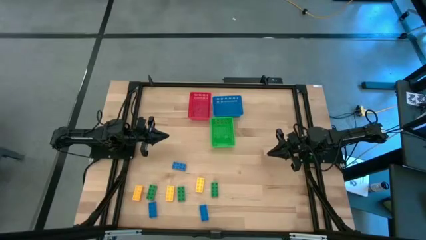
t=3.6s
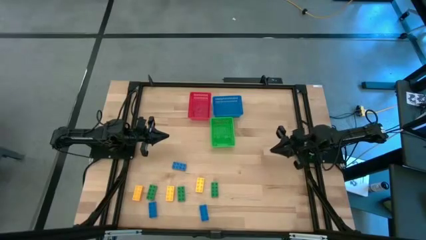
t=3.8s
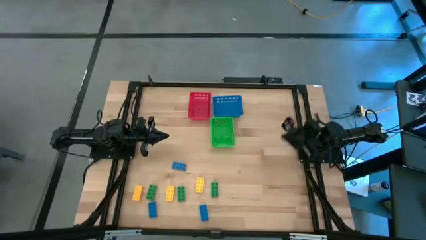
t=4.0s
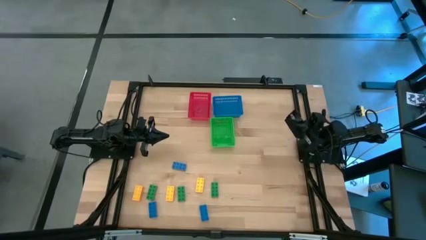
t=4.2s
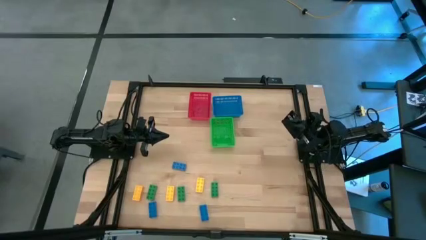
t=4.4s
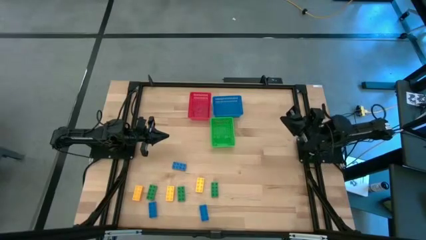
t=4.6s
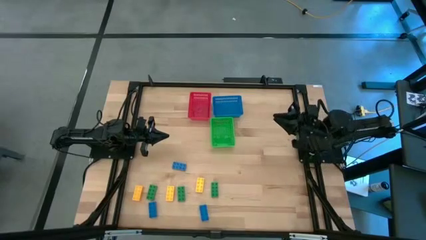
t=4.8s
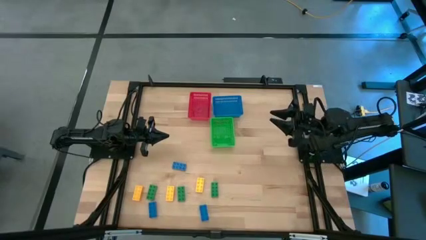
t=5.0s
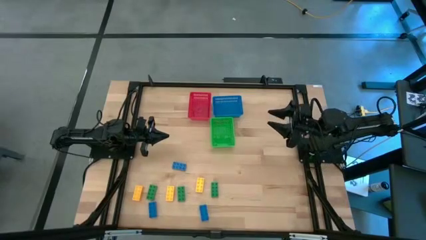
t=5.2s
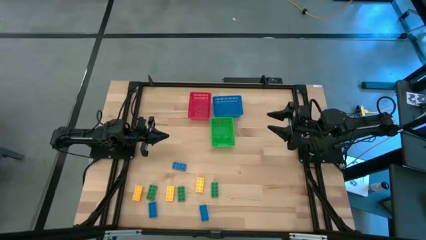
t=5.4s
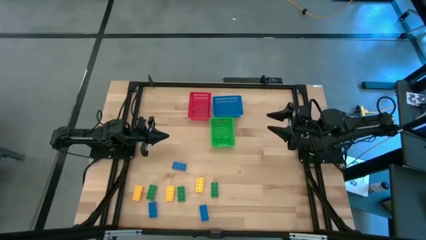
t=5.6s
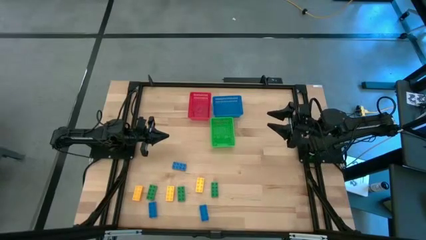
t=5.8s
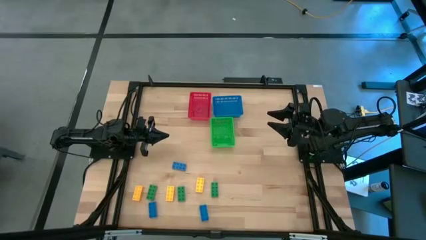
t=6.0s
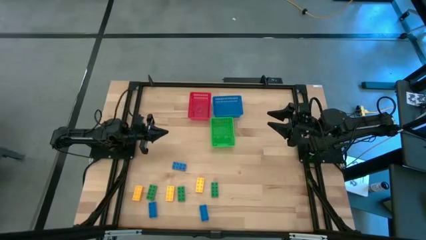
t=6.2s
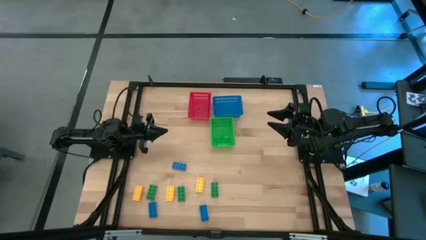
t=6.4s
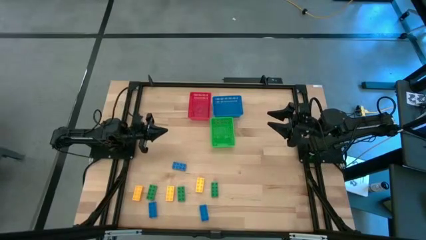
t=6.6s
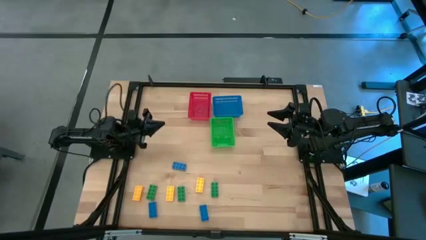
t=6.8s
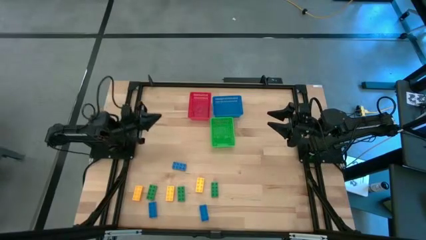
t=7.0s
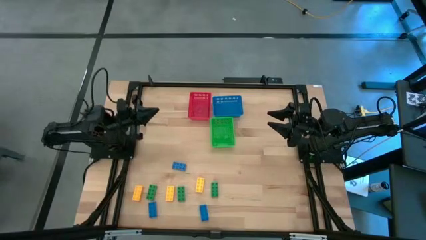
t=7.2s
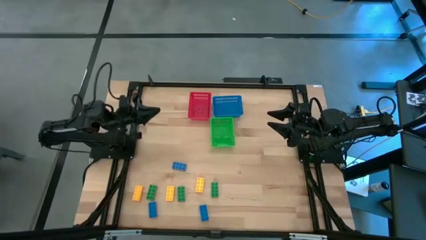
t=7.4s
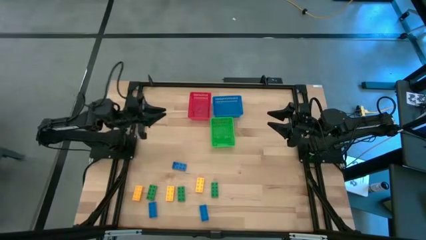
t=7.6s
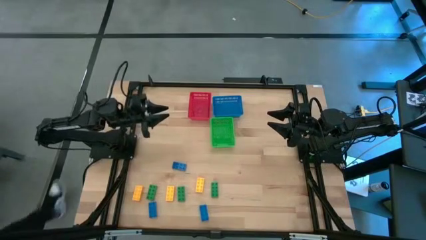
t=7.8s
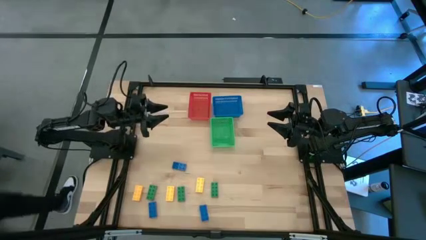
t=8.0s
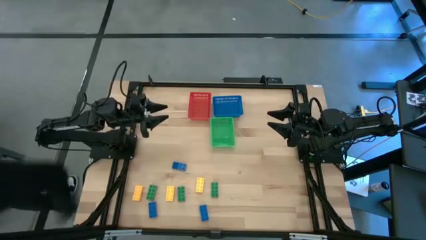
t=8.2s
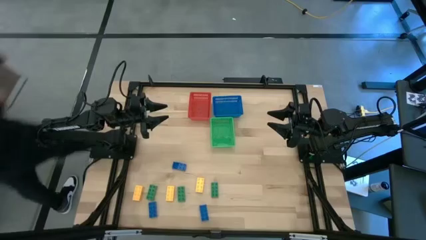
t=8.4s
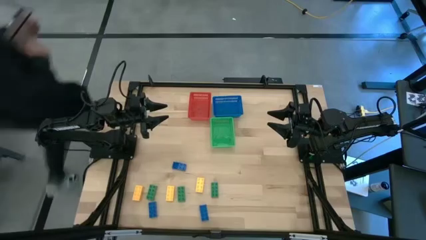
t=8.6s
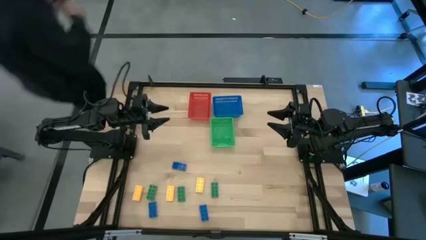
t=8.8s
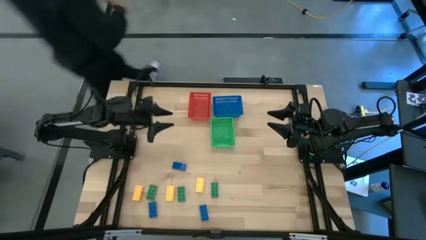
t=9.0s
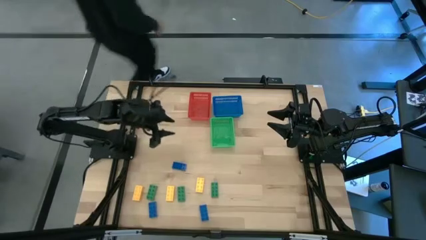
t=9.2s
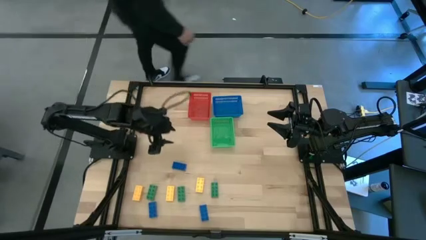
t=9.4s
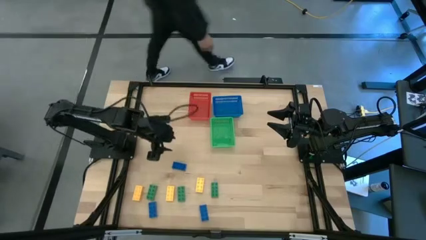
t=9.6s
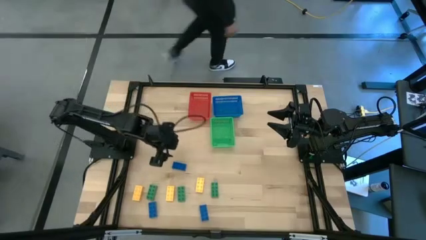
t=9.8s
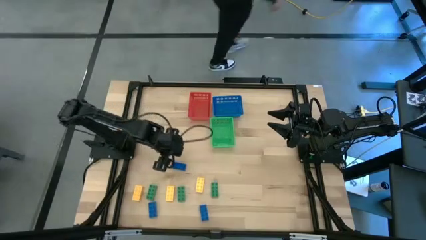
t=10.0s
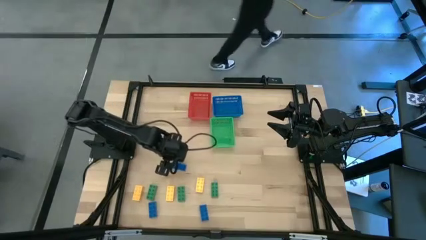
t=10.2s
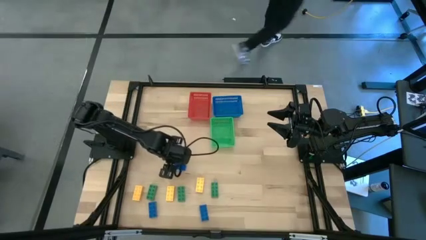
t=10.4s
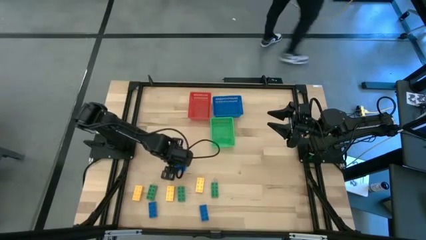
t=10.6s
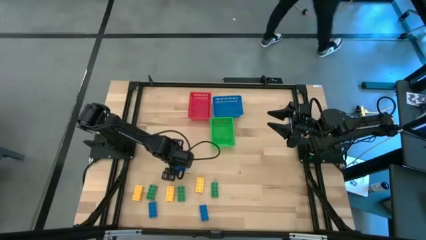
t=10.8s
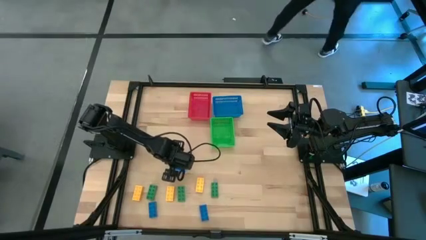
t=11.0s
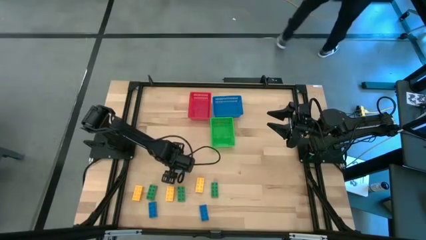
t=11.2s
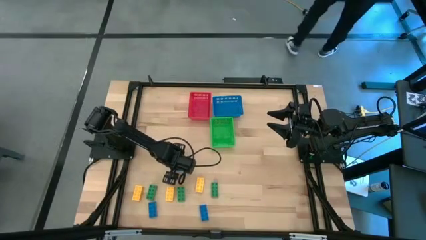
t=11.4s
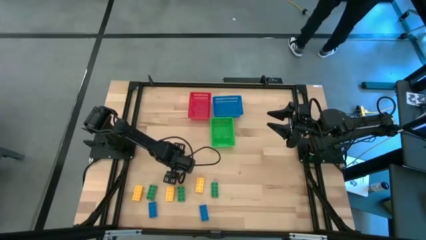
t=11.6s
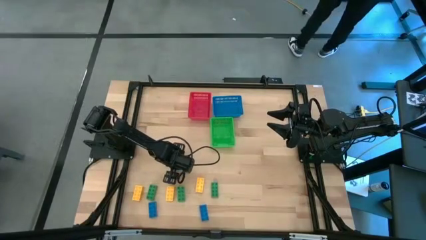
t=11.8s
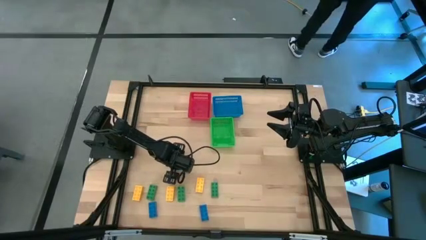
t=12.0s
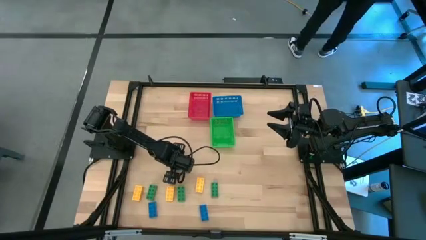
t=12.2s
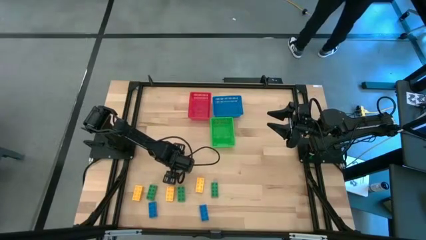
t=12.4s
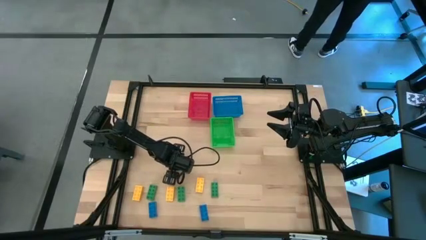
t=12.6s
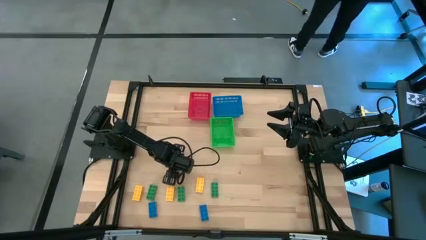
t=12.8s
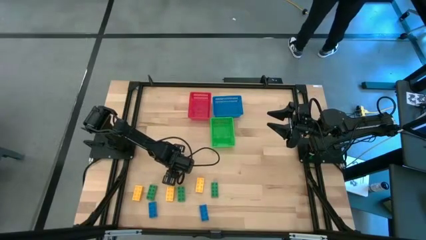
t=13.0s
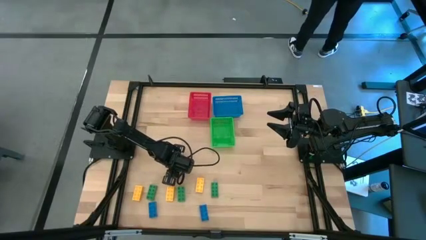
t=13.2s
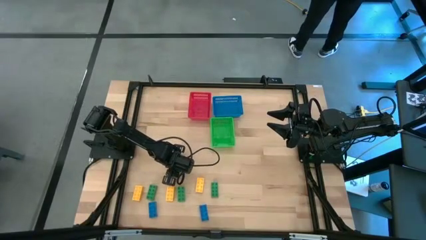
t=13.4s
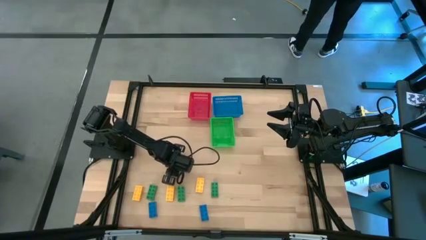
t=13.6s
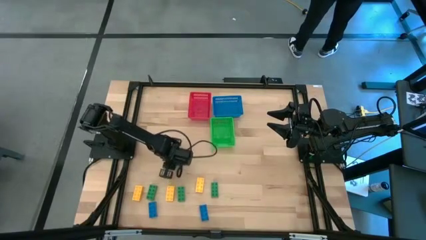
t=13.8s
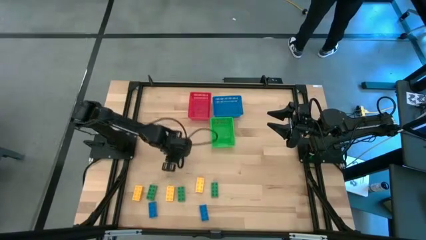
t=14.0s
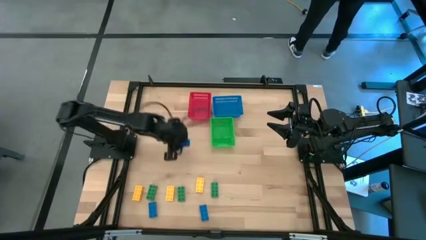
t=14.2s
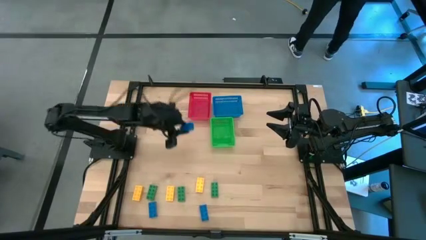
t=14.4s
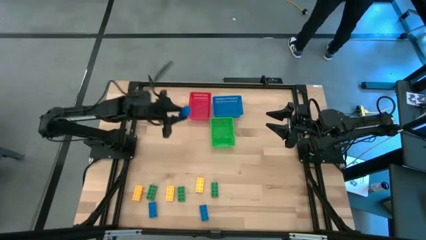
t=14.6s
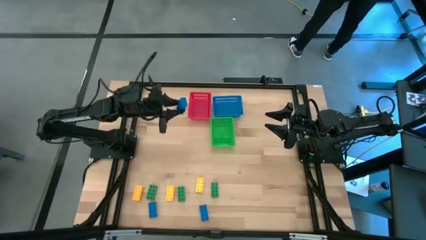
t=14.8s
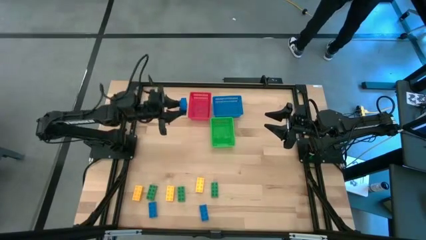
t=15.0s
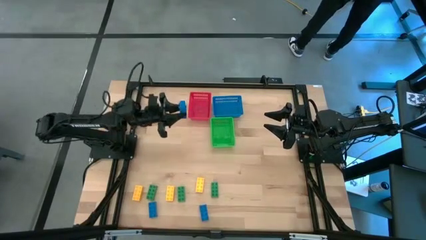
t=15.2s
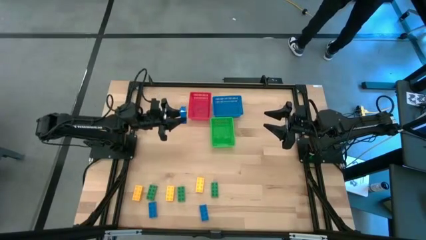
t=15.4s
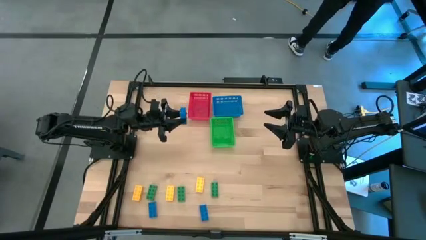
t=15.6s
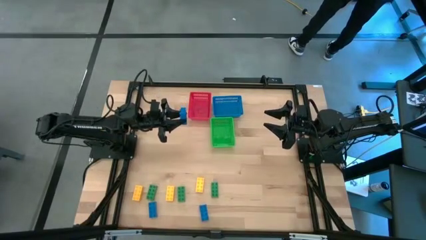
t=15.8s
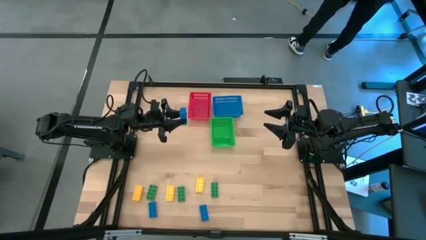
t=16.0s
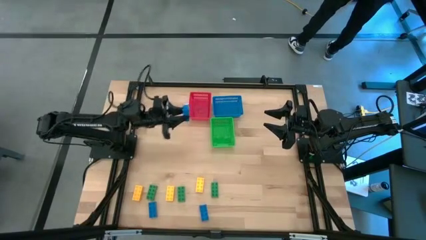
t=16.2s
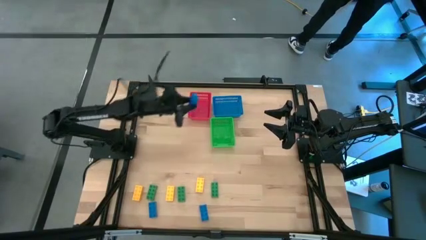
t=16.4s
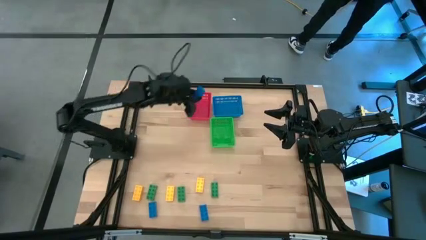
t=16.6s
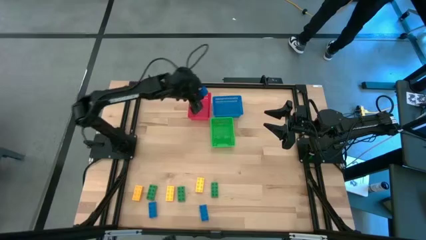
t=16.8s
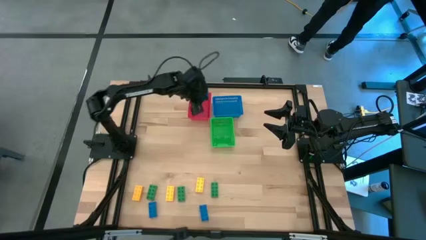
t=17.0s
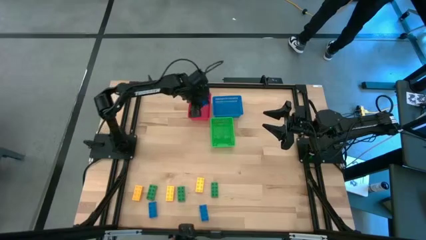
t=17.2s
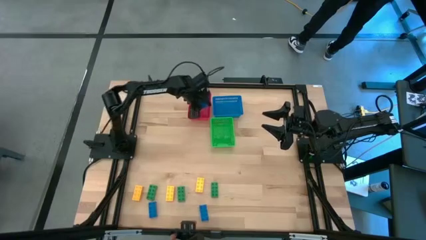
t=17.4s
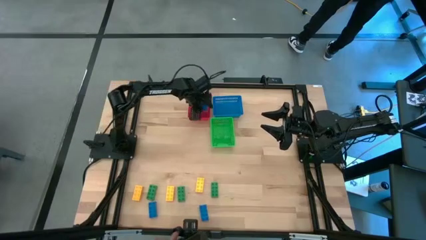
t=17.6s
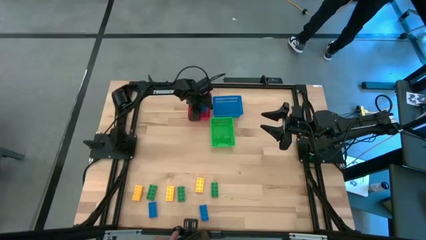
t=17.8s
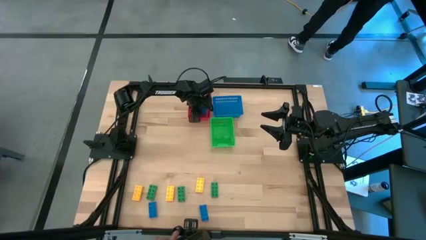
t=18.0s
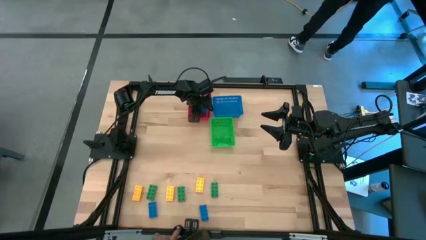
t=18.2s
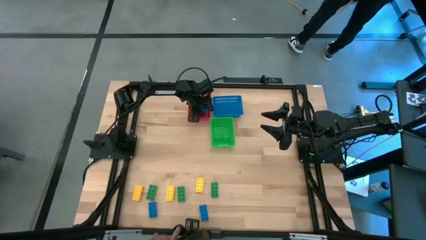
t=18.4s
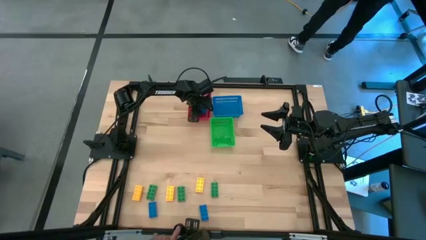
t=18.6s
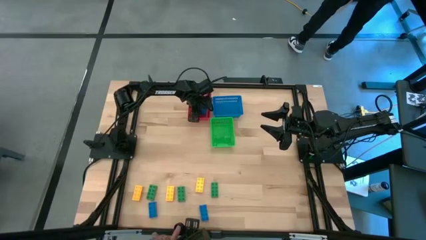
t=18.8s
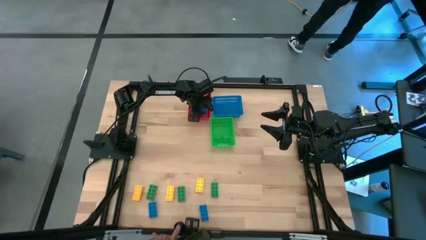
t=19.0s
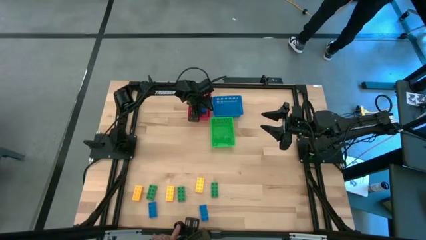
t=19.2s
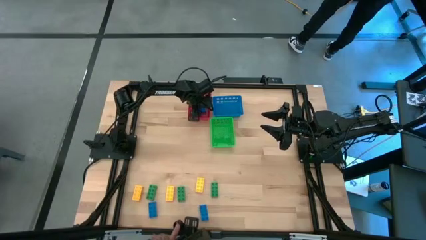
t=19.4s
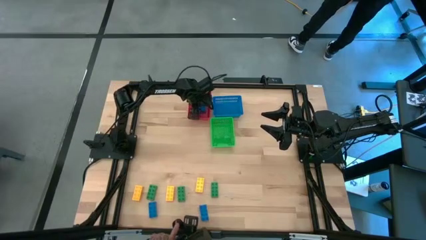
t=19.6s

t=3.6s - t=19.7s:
Task: Sort & place blocks by color
Put the top blue game piece into the red bin
